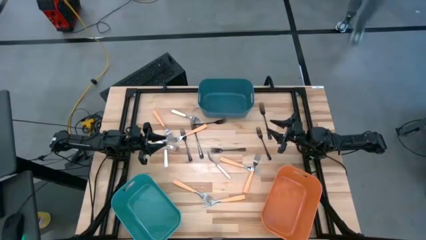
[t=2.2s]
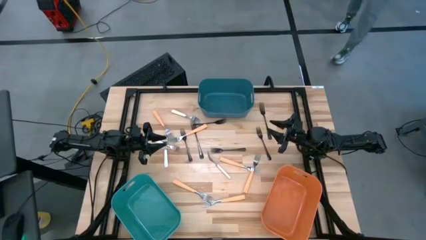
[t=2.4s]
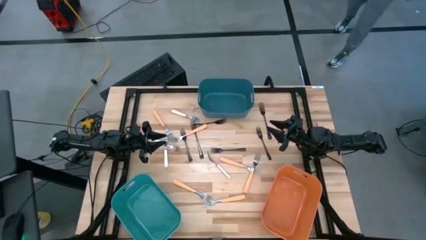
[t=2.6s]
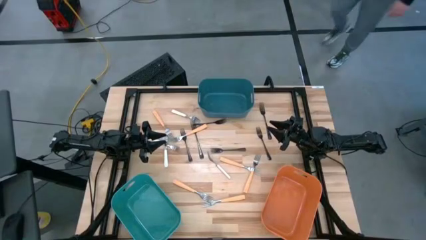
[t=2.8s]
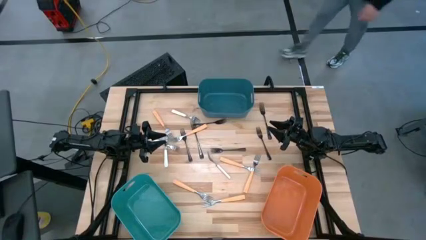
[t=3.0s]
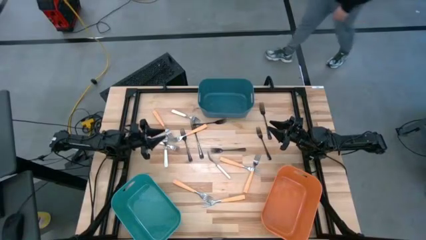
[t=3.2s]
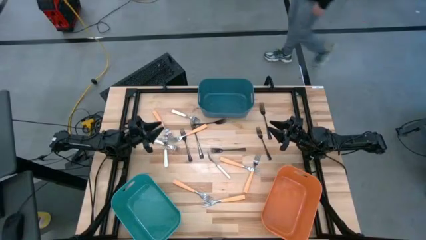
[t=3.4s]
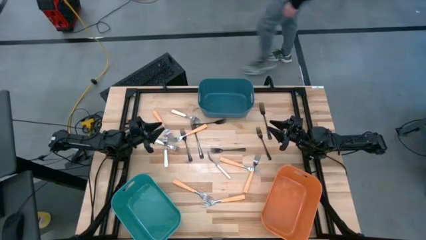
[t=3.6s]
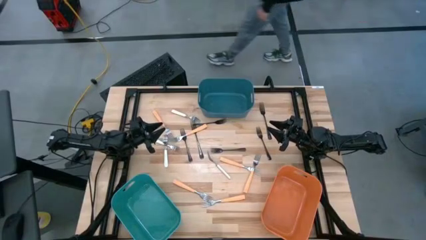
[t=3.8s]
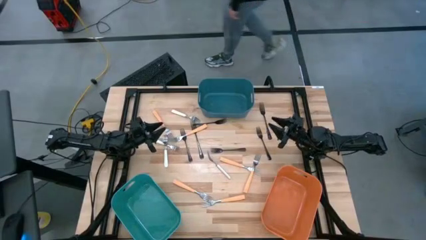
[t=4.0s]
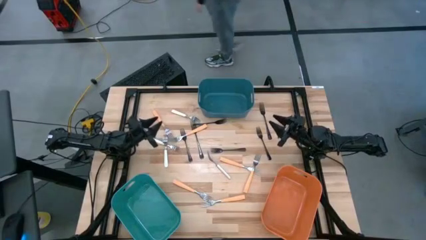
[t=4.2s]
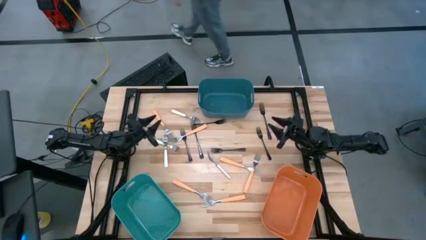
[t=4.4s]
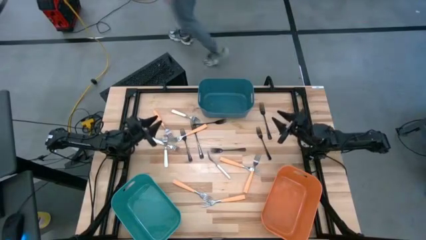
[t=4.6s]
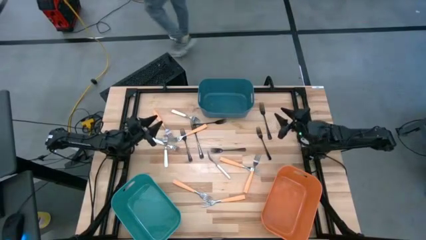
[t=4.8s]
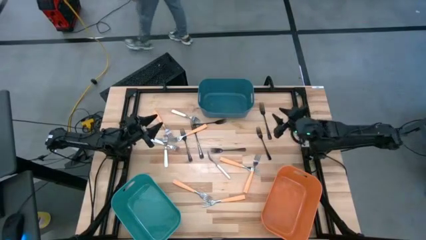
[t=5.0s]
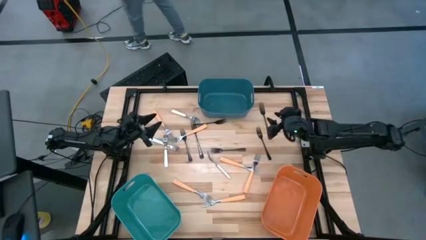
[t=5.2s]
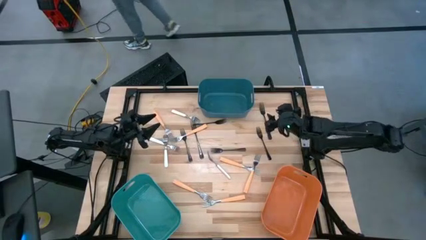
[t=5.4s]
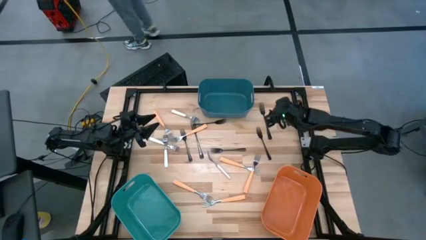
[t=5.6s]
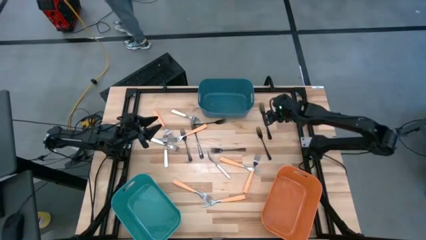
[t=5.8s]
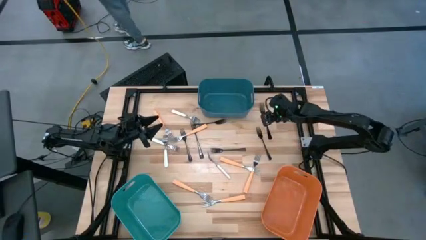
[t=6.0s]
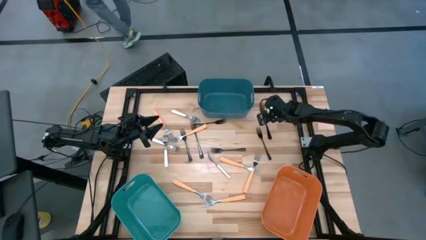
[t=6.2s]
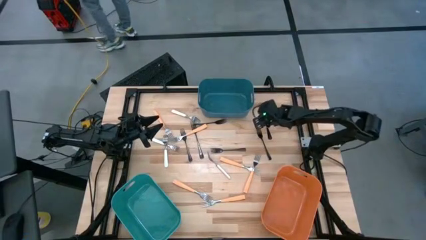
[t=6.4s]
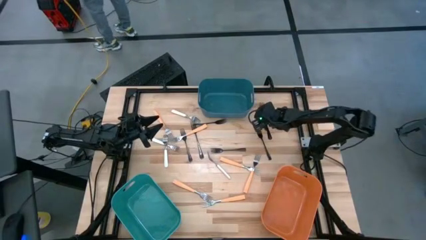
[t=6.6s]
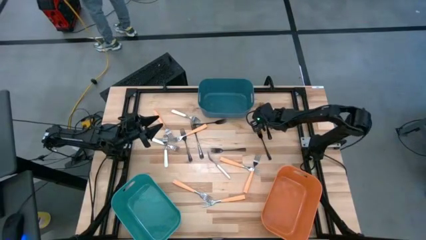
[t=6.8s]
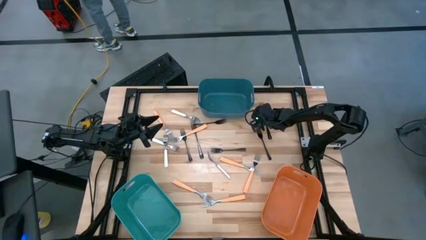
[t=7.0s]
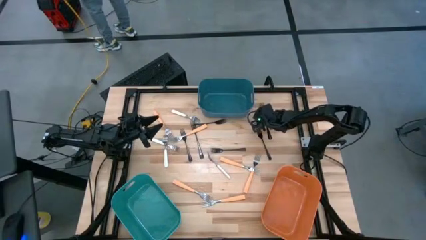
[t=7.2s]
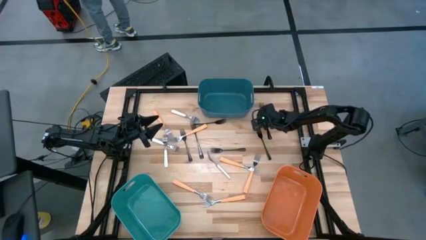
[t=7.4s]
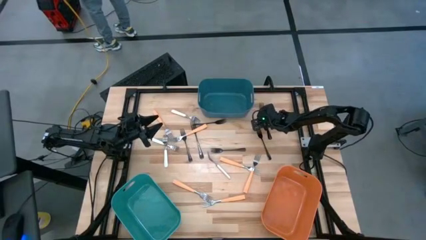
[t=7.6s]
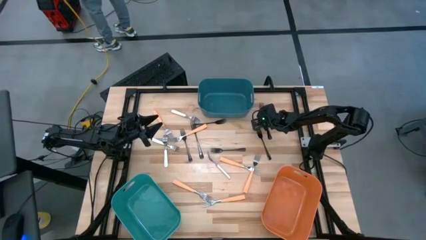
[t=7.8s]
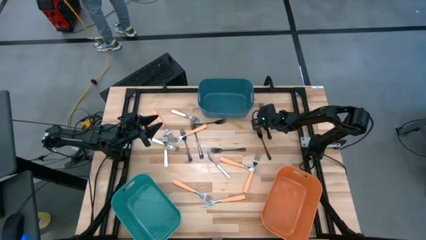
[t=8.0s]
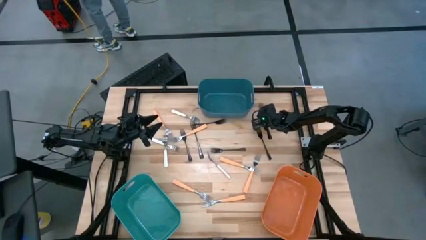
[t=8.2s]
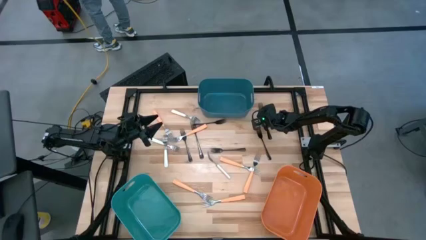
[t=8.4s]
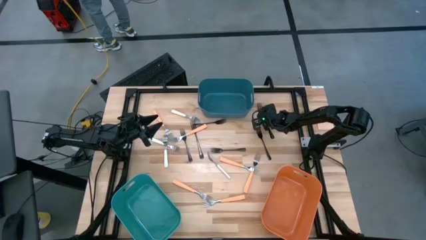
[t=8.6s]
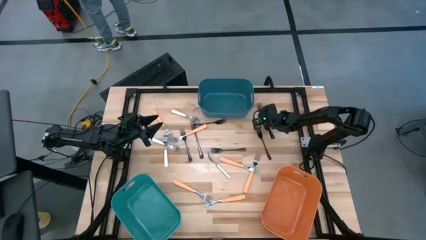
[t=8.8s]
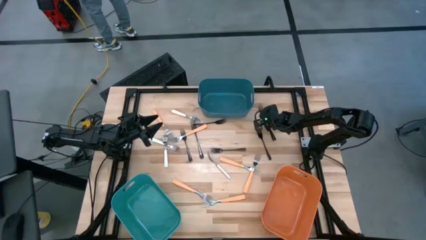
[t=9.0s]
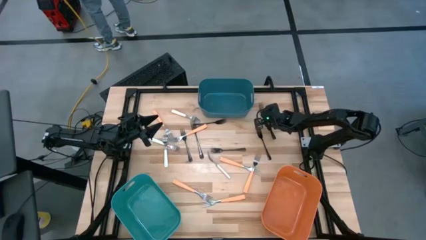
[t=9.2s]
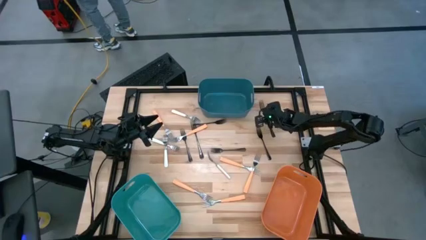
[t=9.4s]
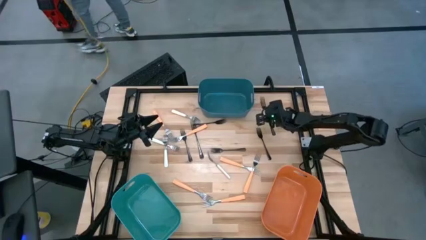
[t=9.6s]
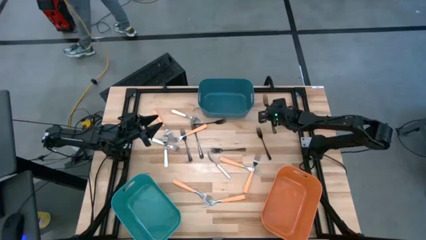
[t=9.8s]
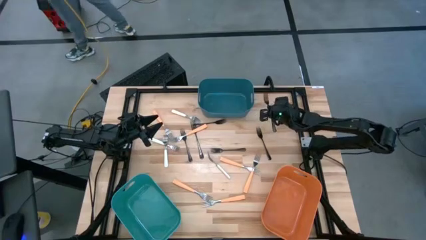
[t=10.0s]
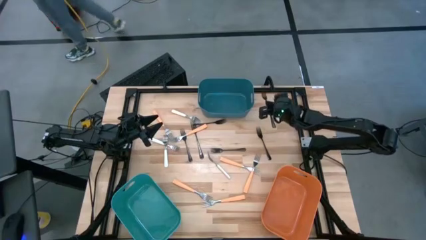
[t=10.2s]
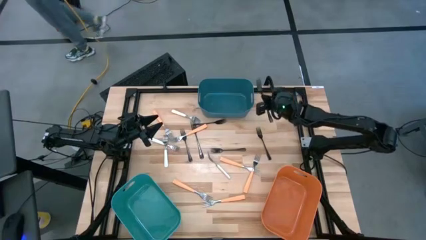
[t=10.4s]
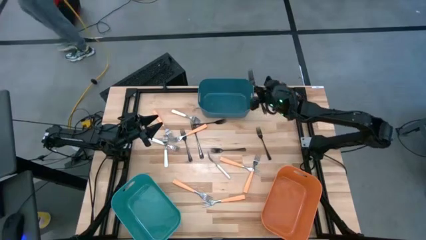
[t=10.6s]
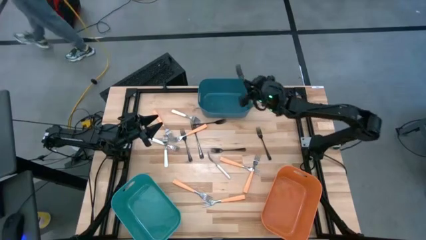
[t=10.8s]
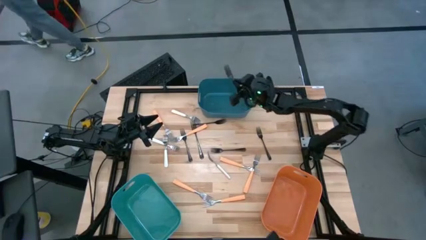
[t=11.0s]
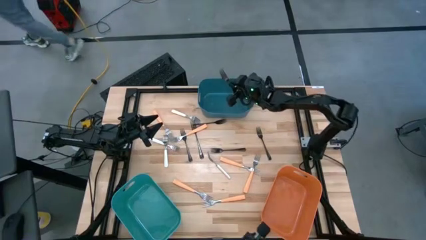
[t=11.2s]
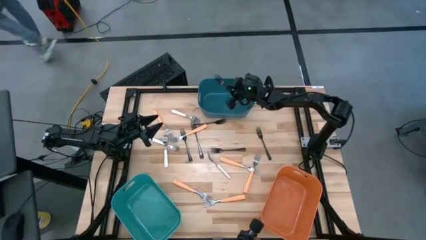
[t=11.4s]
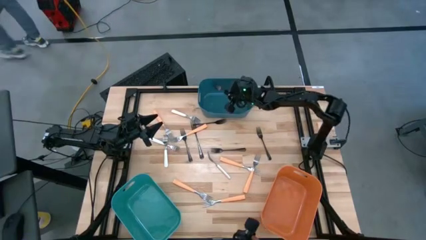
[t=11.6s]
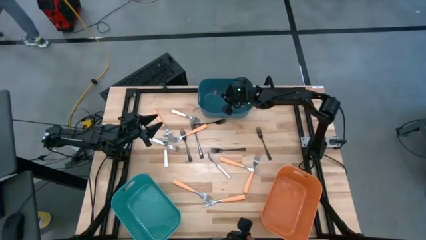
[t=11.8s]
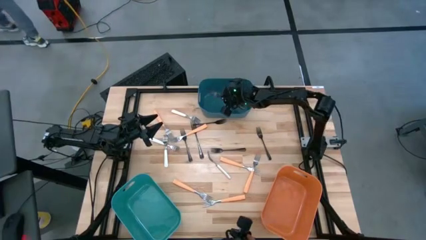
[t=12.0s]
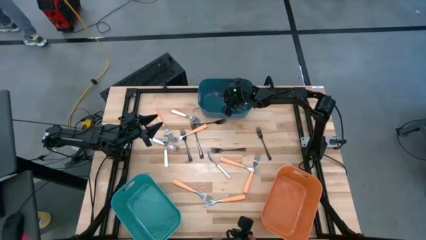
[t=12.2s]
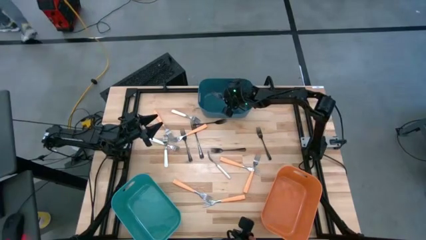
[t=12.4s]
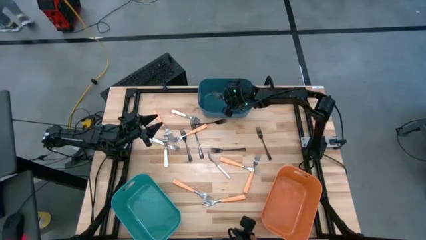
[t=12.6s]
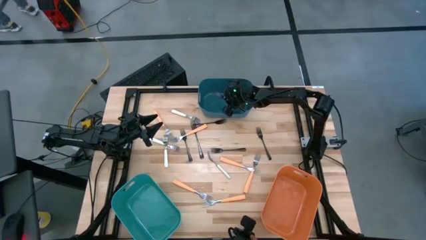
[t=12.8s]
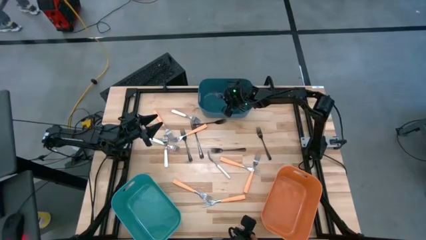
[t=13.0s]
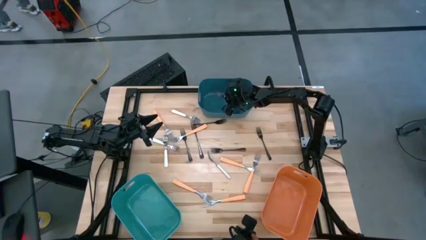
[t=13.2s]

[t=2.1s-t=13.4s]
Task: Sort silverware by color (type)
Put the black fork into the blue bin
